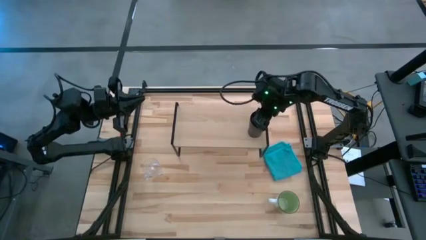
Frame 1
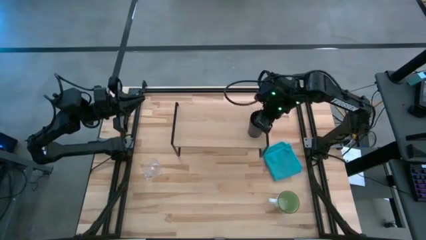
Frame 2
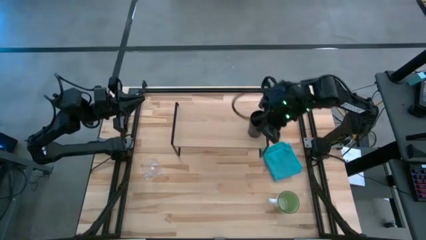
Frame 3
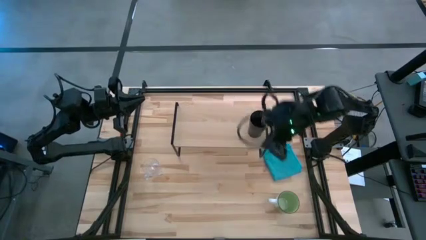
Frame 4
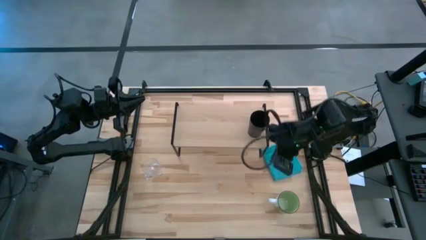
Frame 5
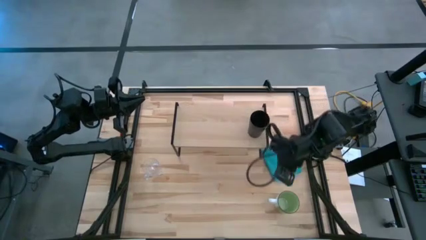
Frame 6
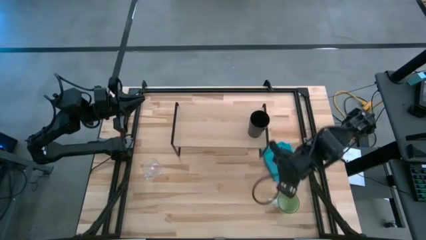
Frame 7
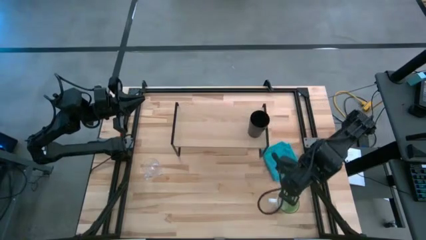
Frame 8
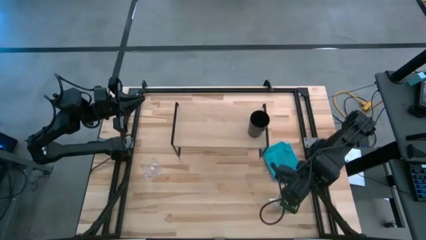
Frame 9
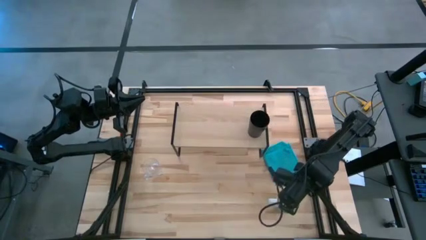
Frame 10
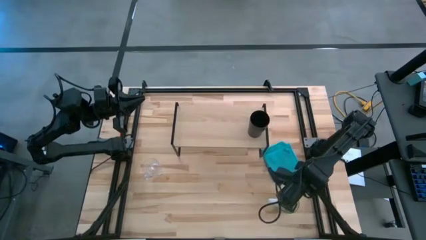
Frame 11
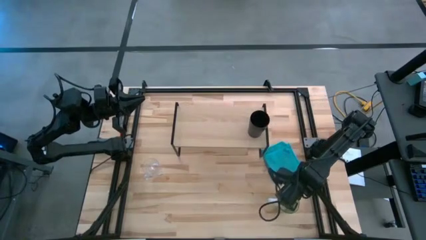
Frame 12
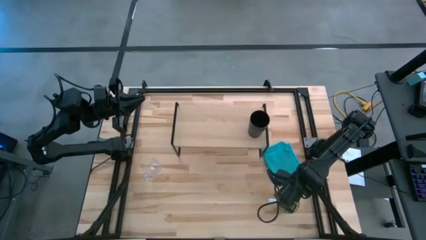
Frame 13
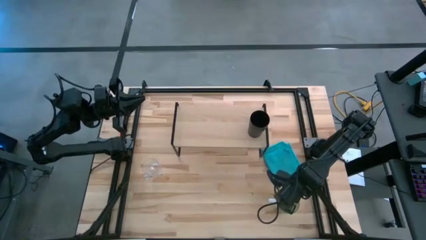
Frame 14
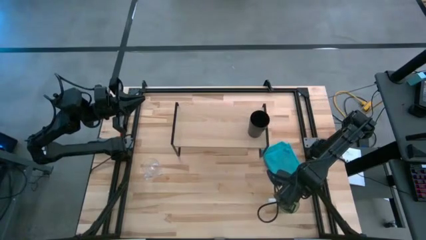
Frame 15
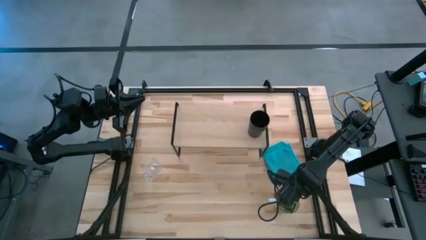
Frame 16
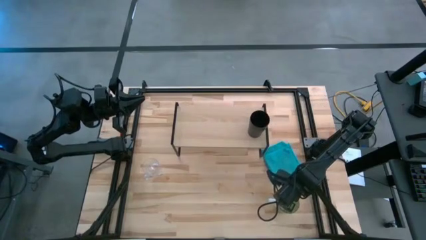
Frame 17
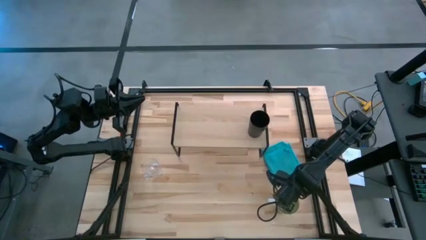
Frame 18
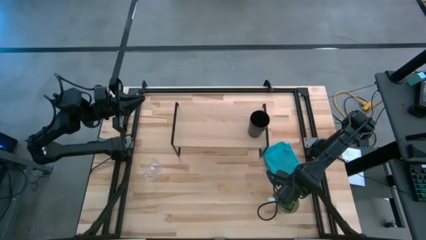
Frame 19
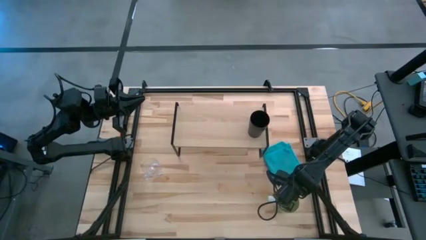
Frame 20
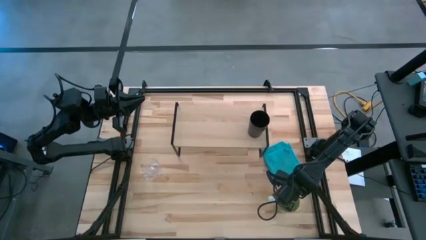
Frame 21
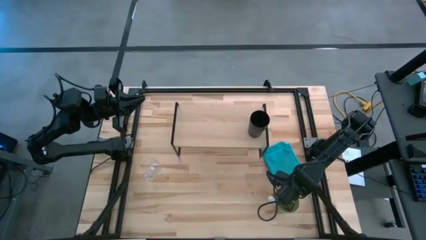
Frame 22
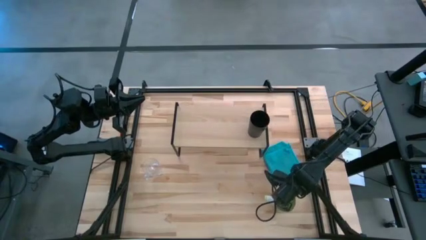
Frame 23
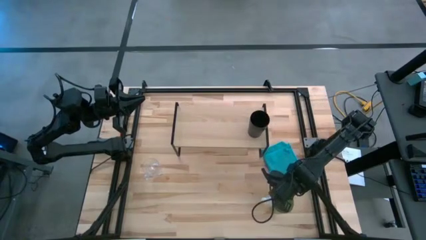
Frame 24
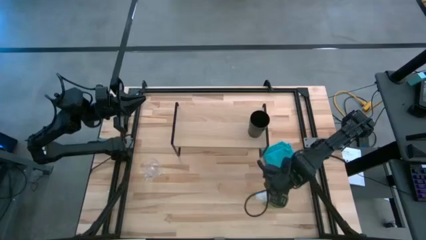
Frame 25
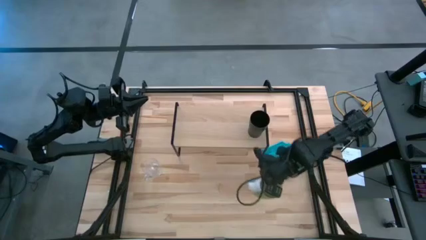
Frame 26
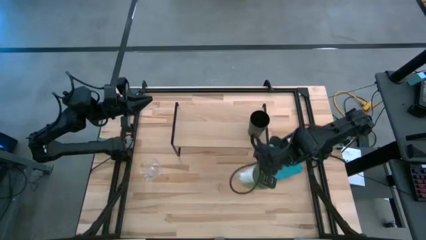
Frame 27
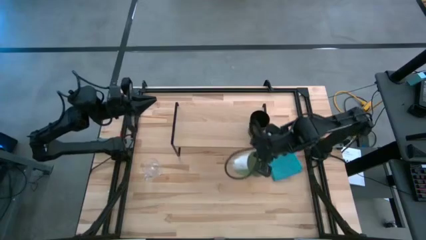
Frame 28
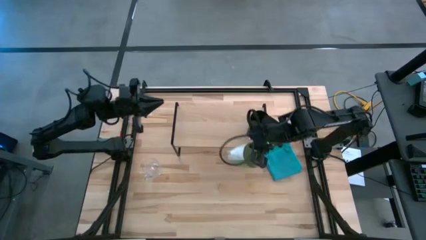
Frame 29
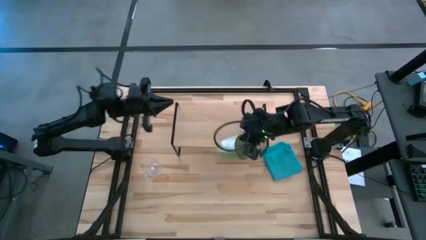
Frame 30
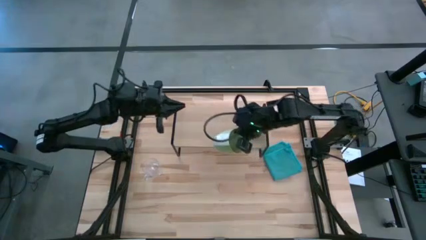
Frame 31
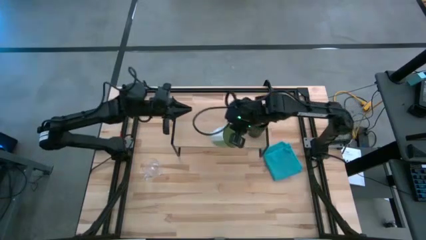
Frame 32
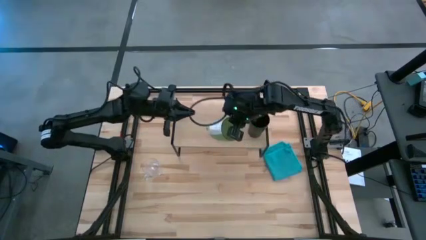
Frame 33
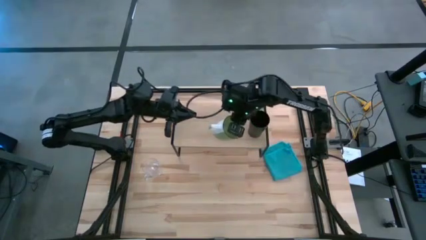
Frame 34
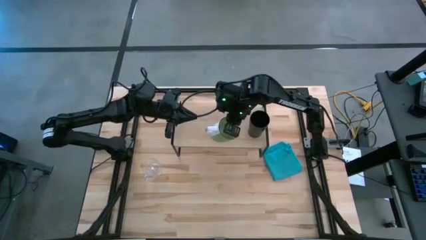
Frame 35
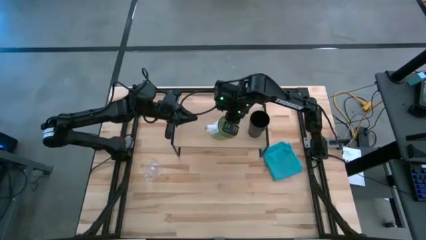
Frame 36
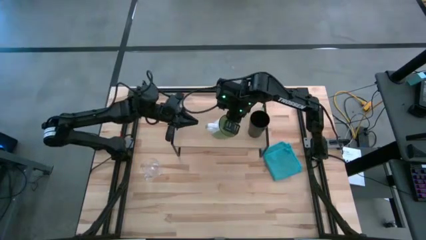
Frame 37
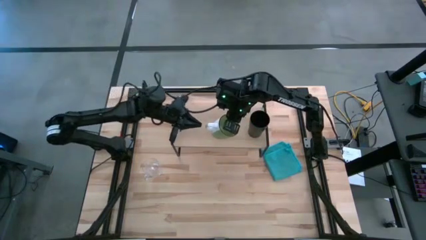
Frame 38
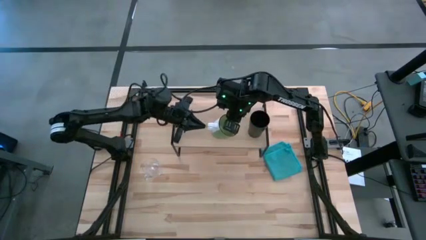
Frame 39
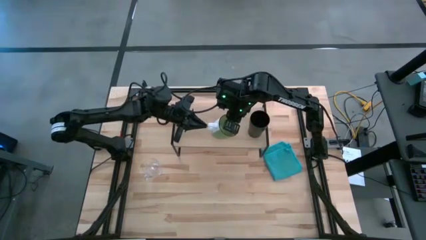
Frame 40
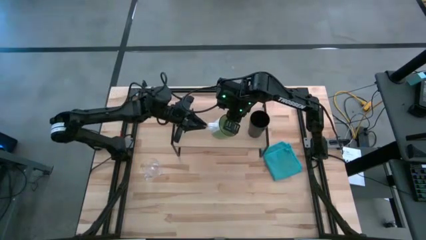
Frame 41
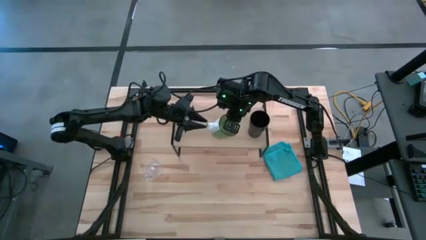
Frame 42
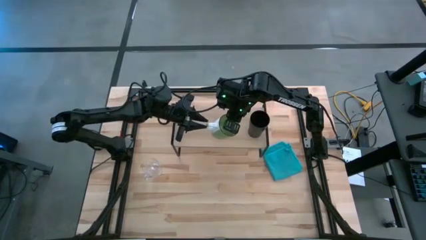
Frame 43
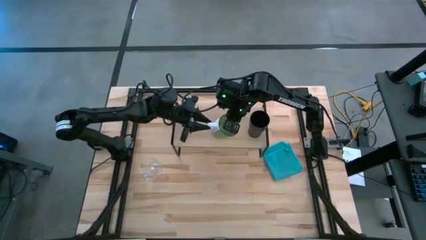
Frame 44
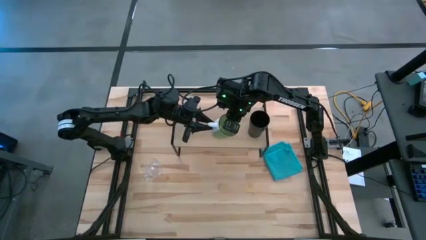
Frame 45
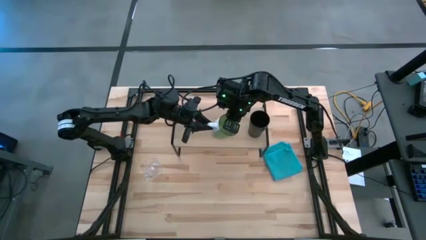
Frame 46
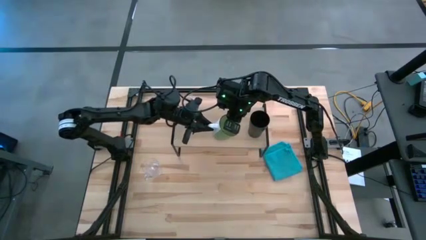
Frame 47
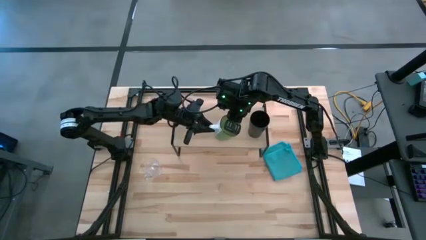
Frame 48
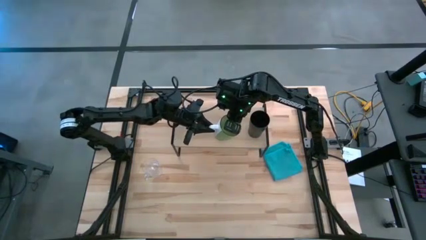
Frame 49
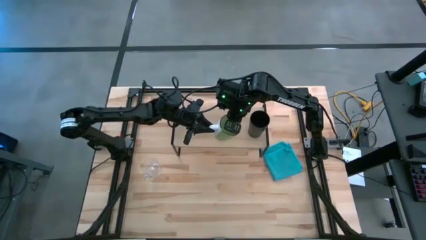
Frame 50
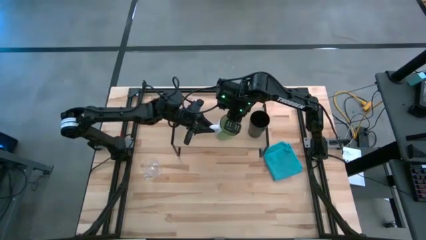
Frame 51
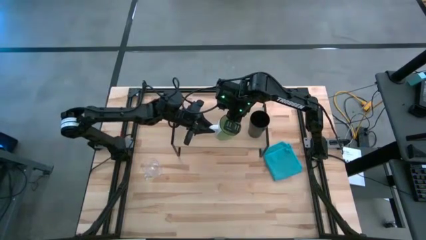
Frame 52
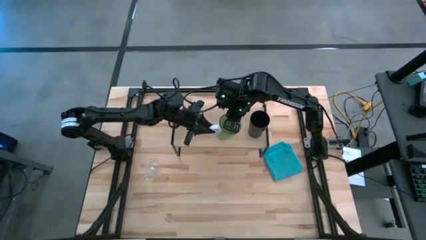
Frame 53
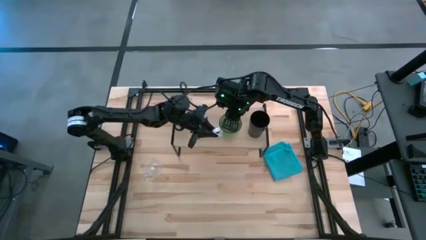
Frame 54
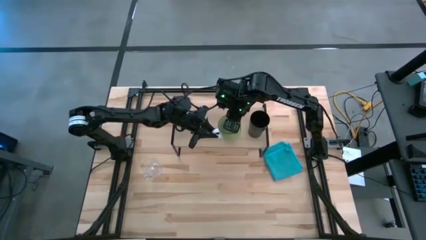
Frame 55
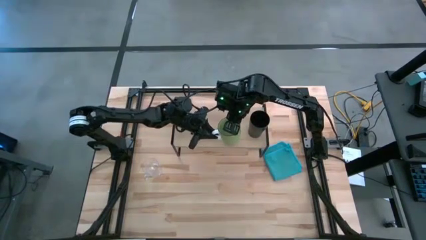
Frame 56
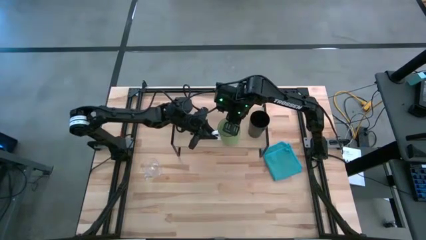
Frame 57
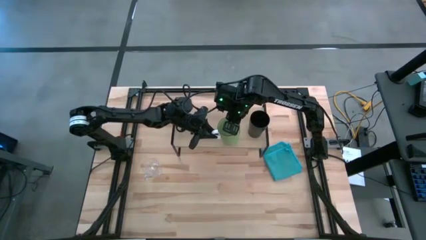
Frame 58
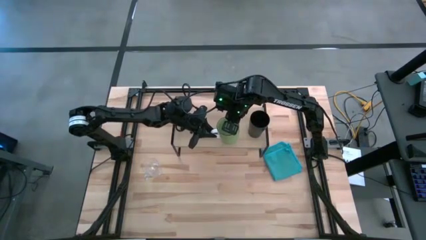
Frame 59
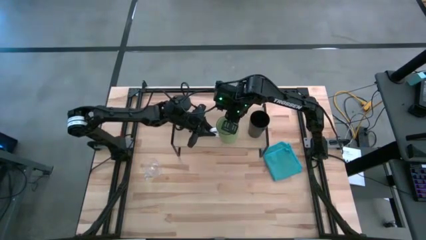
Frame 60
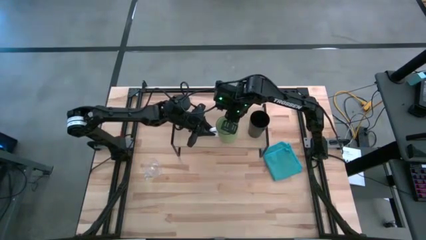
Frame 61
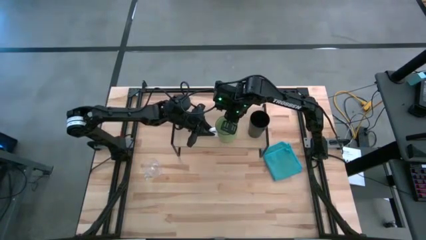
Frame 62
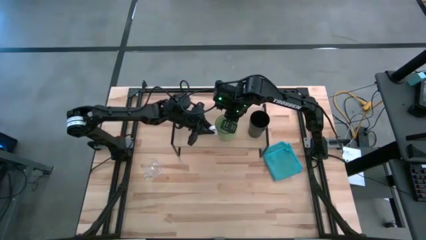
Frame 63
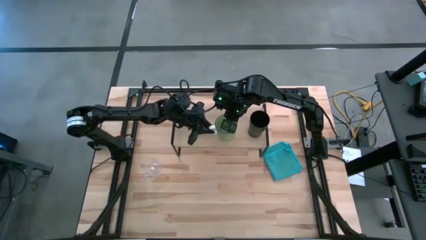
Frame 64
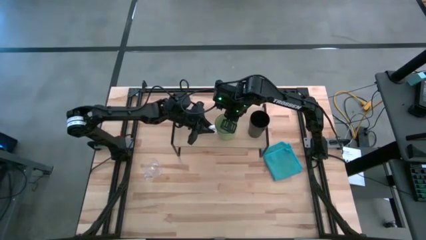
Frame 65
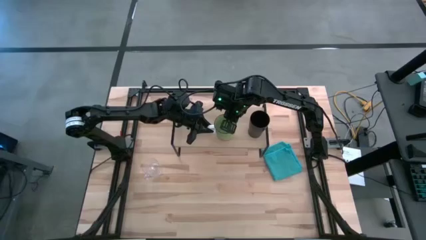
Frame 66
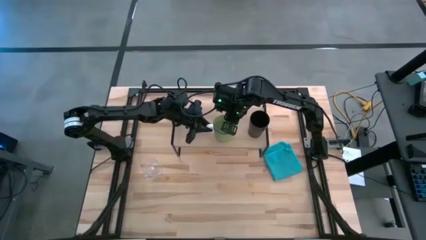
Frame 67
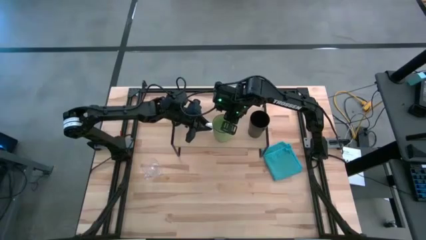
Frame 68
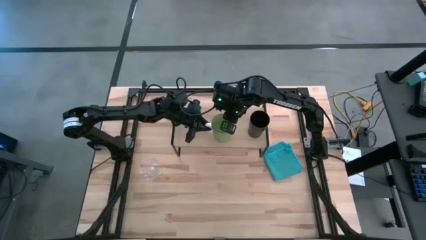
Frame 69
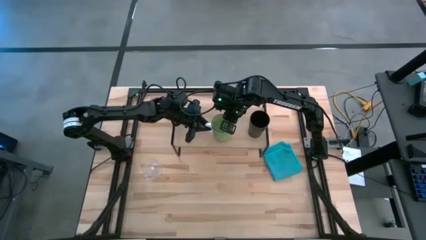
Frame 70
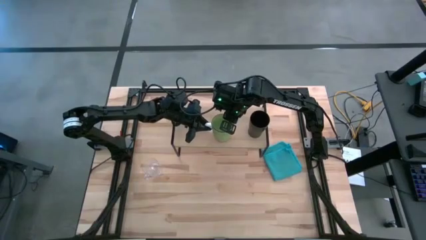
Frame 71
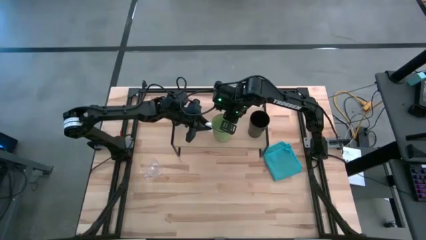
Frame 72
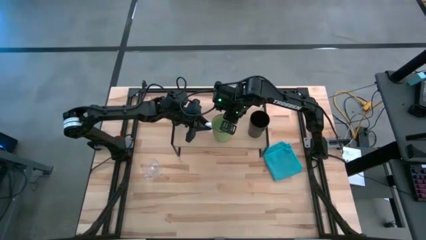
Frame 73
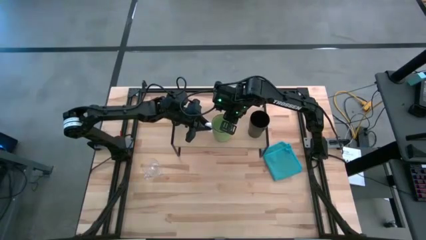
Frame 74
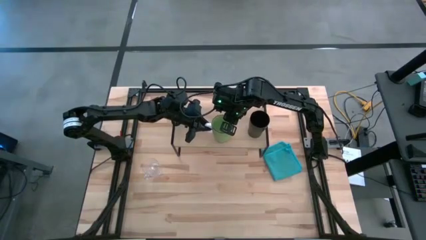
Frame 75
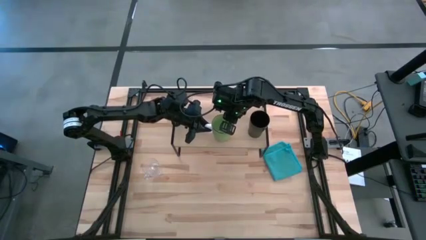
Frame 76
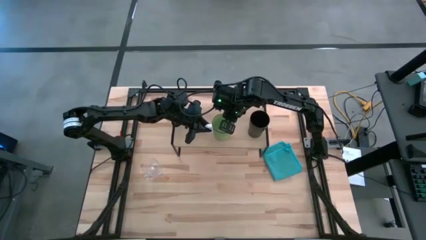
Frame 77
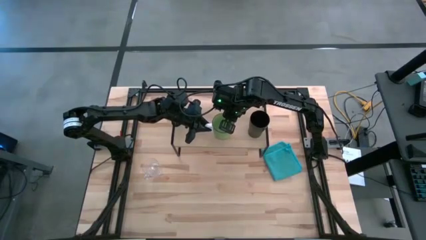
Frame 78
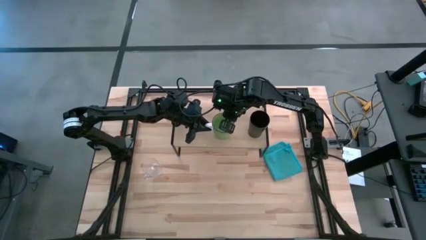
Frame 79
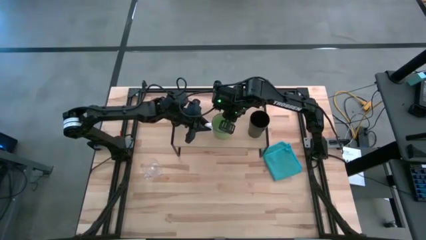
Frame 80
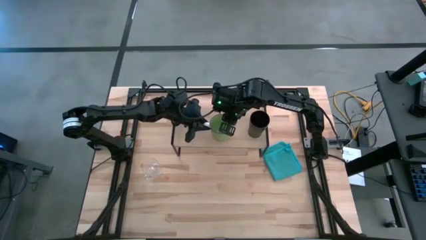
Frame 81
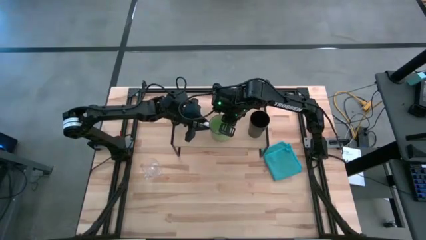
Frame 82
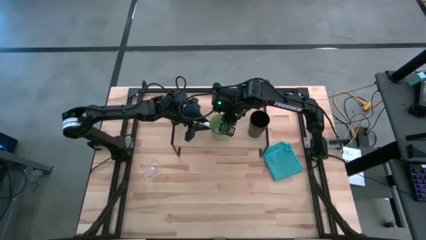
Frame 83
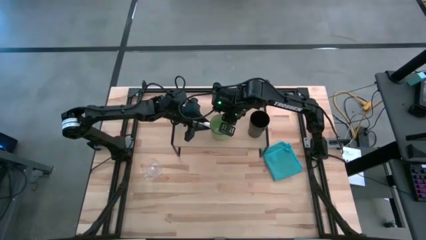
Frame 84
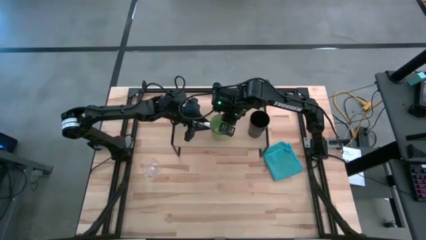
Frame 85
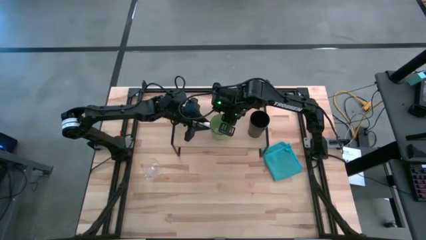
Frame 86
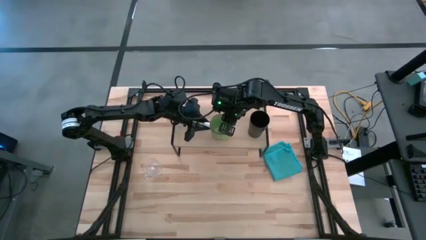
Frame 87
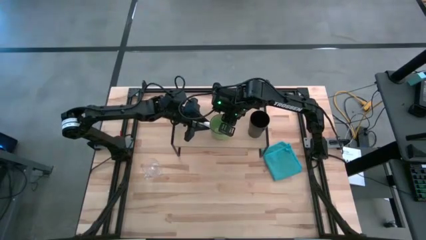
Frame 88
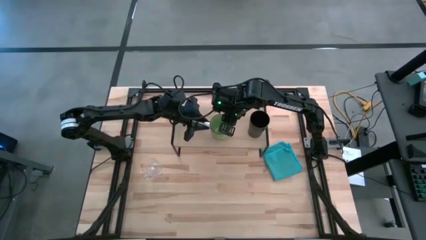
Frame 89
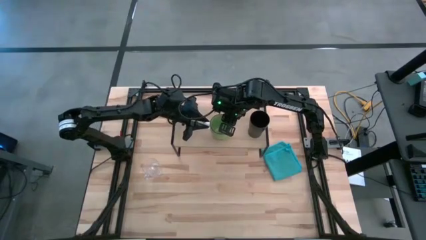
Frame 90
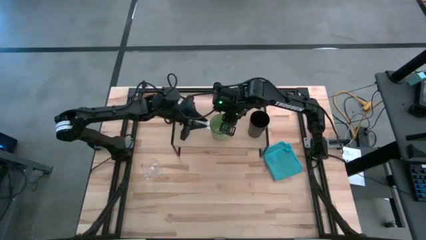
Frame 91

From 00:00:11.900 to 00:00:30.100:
Task: Stack small to large cups/mugs on shelf
Put the green mug on the shelf
